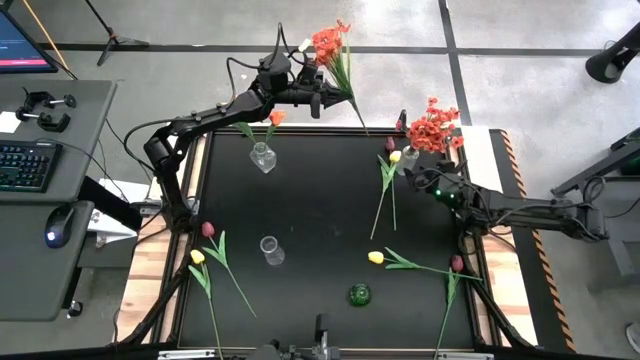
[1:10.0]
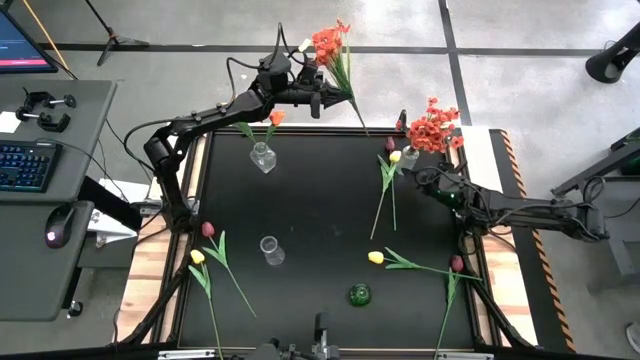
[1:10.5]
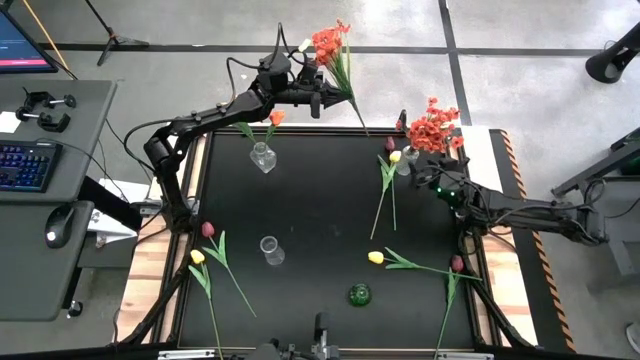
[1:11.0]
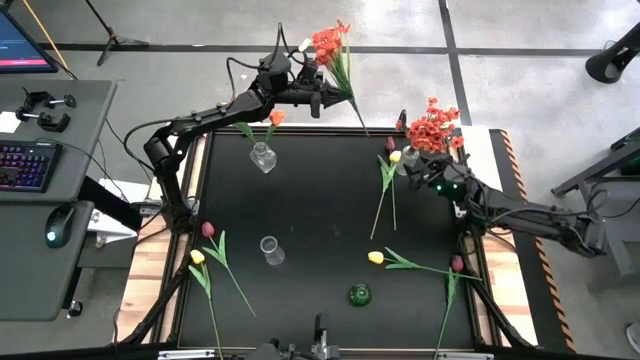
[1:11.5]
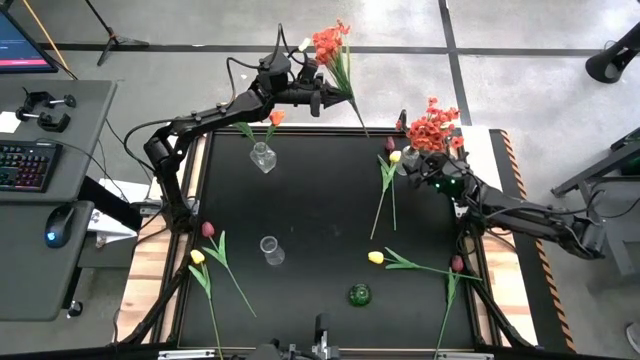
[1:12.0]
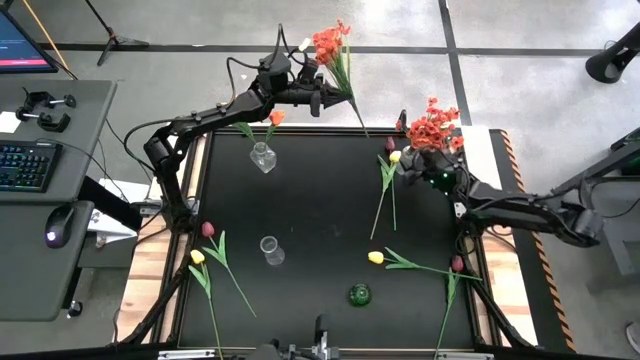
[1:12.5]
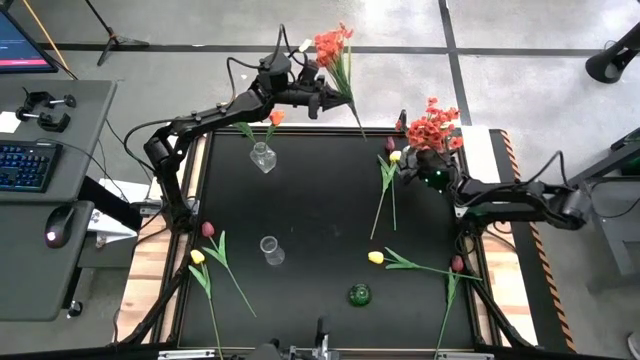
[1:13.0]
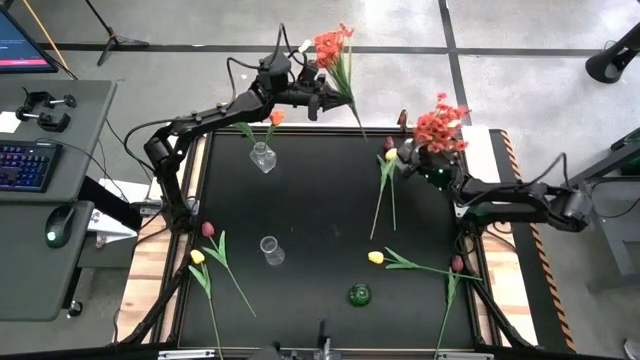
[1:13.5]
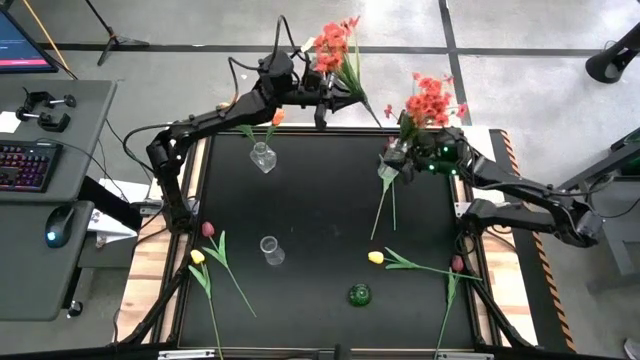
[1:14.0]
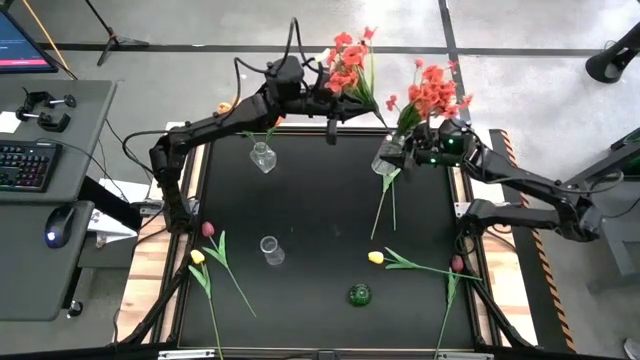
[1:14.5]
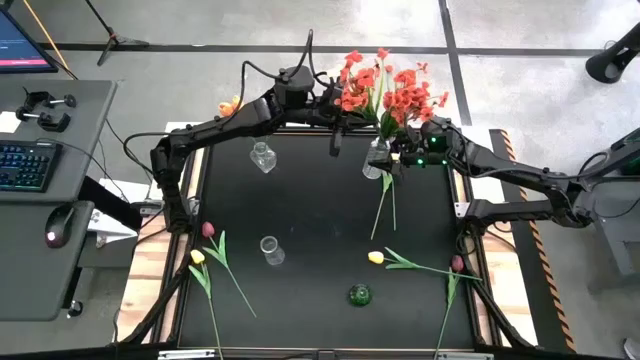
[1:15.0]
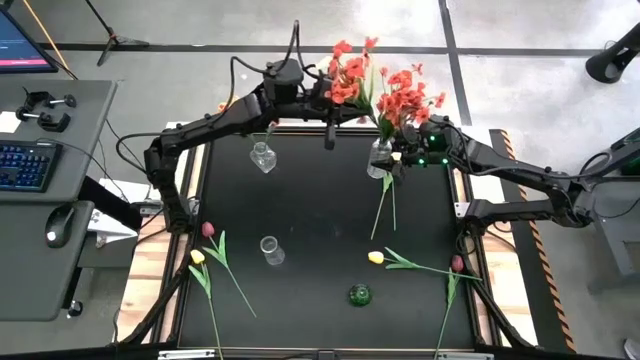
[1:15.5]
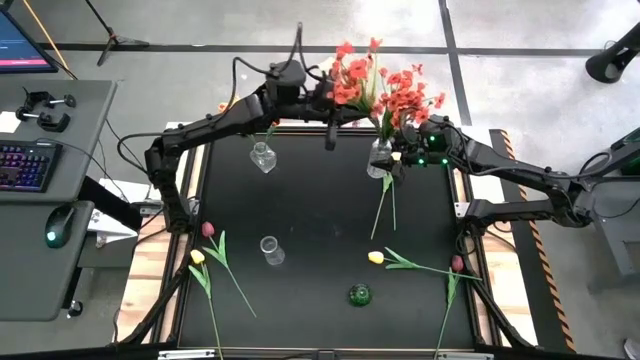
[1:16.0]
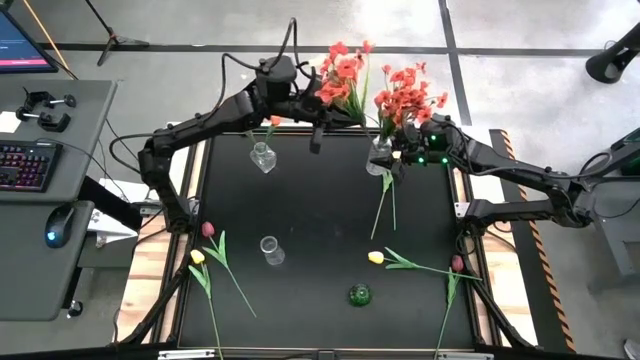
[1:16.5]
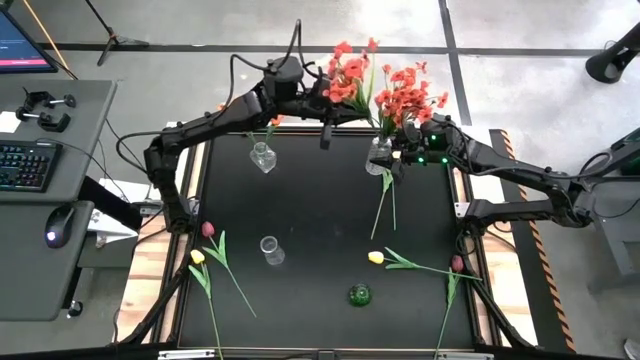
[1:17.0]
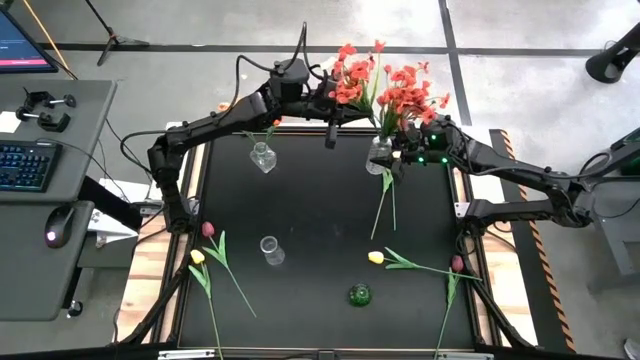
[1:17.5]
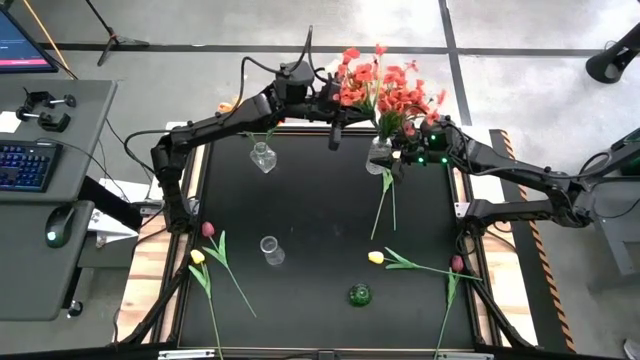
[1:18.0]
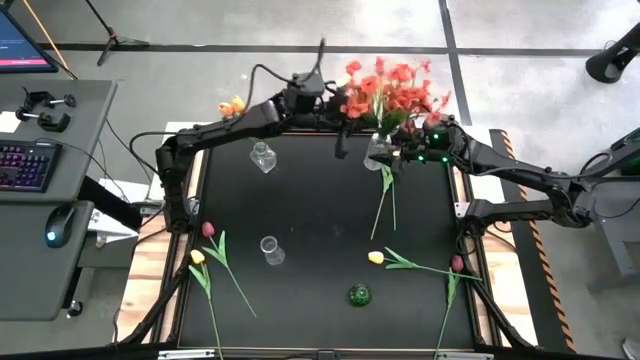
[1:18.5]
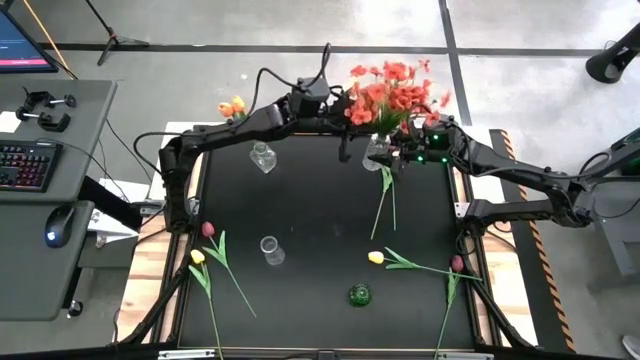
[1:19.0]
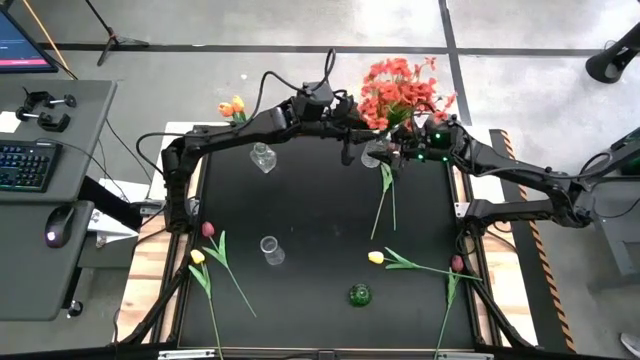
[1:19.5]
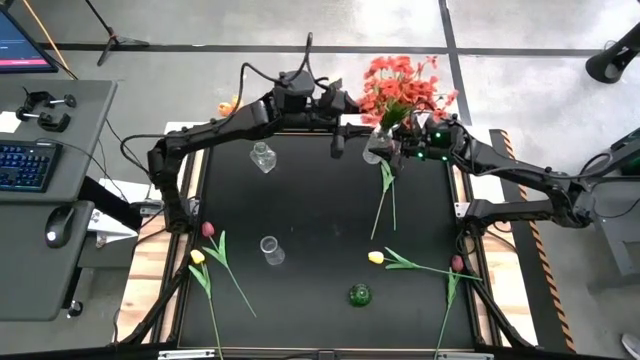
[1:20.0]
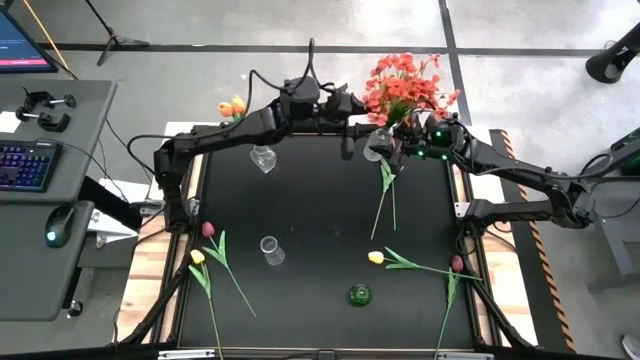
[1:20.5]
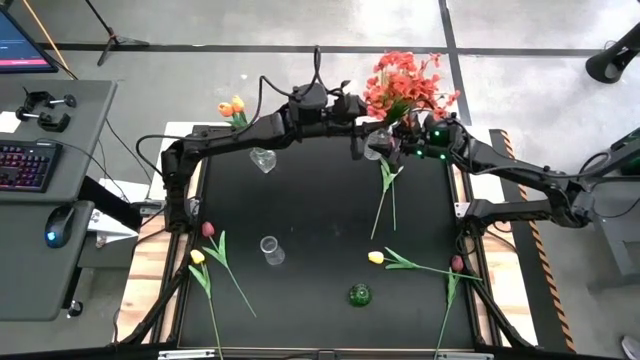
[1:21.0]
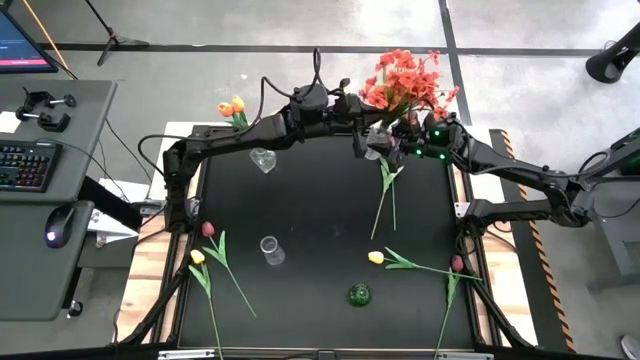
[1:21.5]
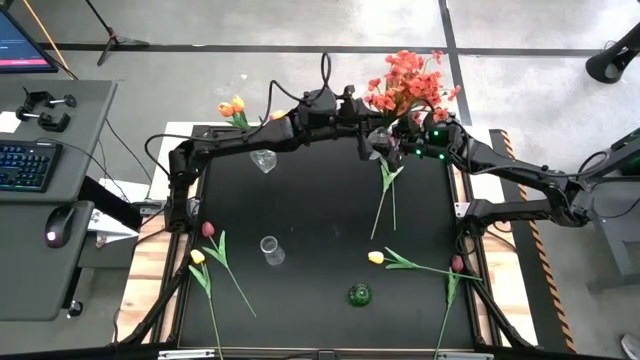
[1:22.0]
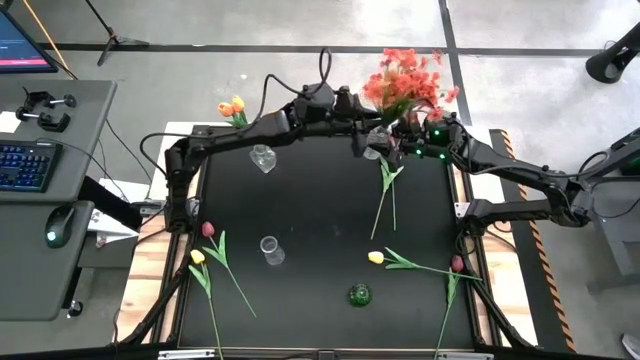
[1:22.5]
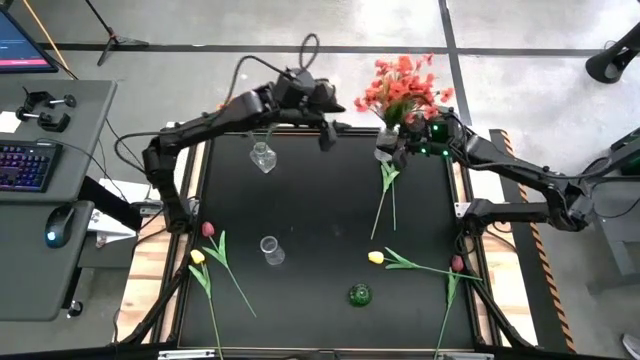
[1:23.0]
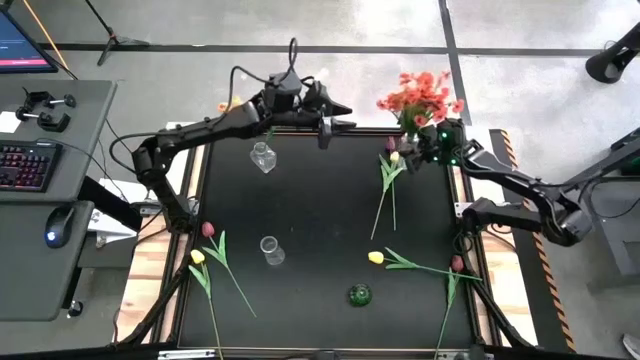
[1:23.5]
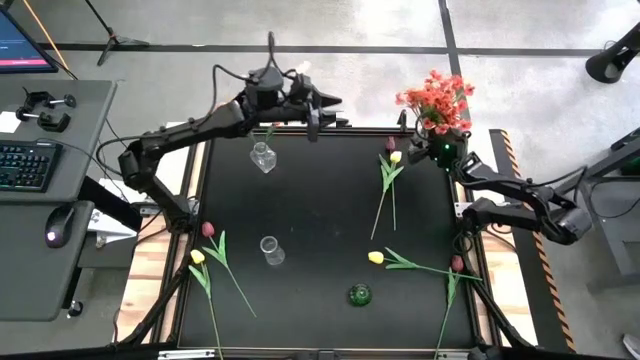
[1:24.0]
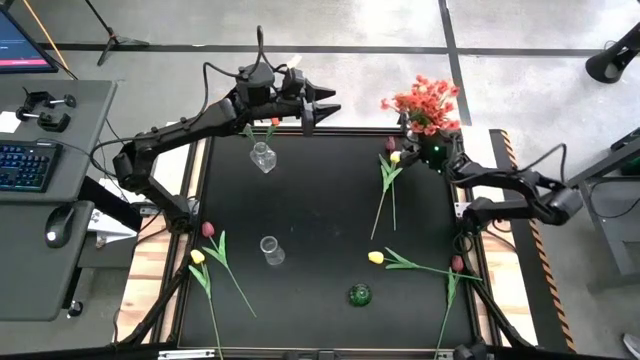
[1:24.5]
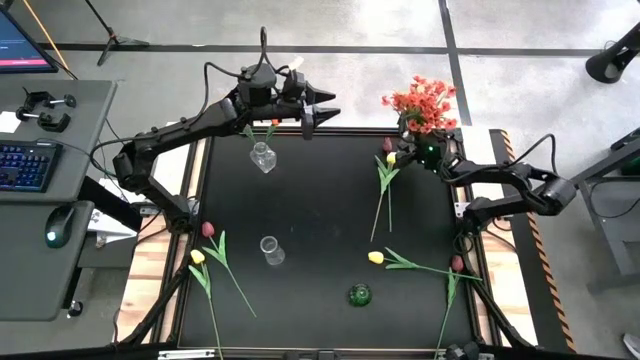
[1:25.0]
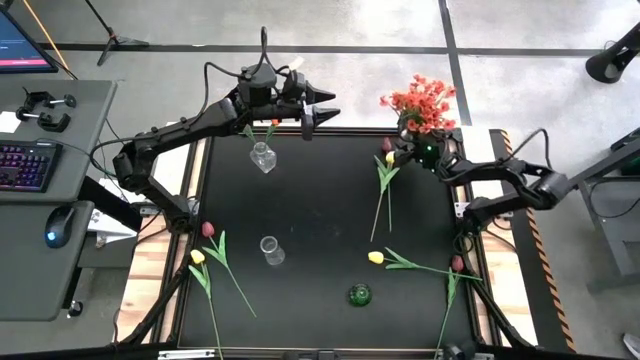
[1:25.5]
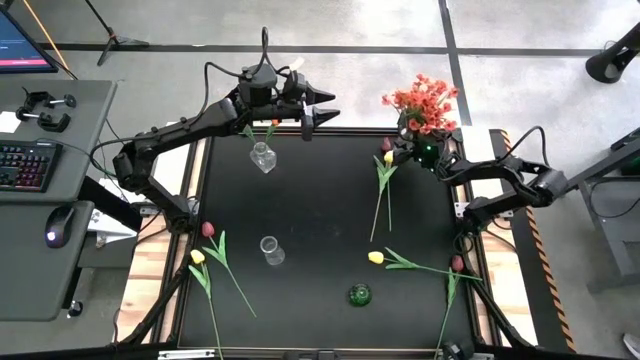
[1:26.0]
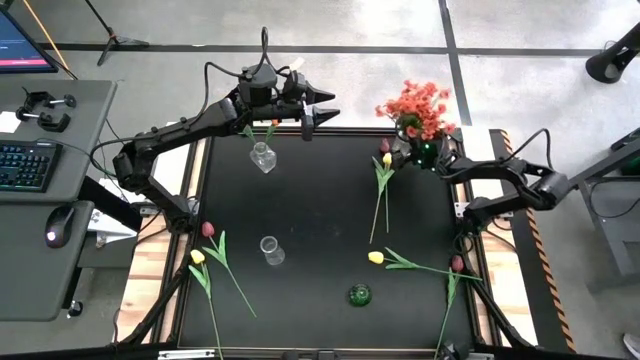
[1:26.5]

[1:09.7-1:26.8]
Task: Sort flowers into vase by color
Put the red flowers into the top right transparent vase

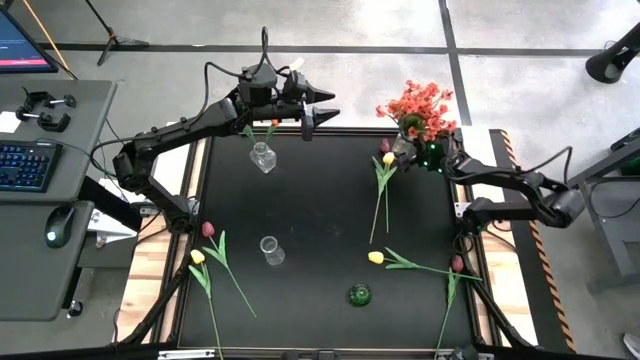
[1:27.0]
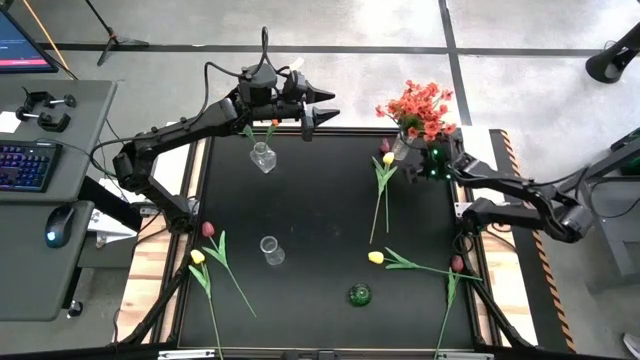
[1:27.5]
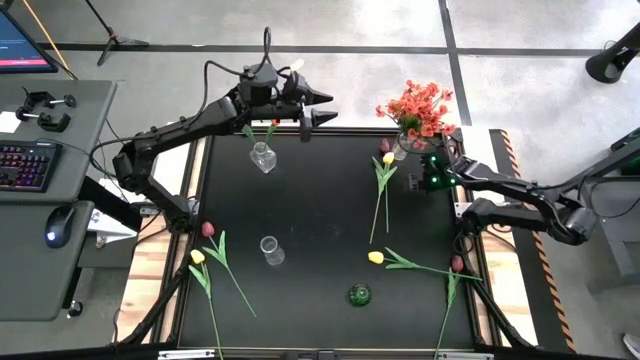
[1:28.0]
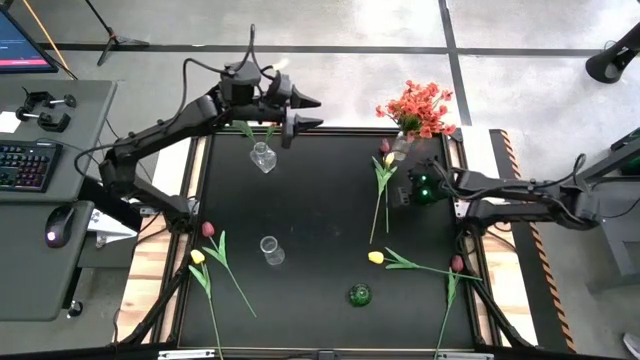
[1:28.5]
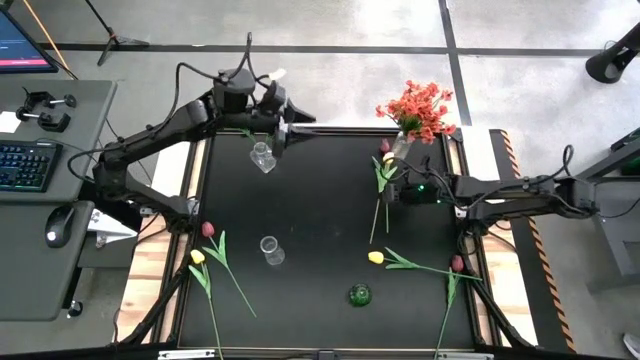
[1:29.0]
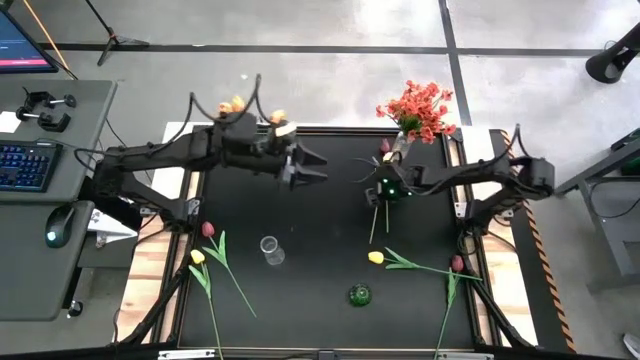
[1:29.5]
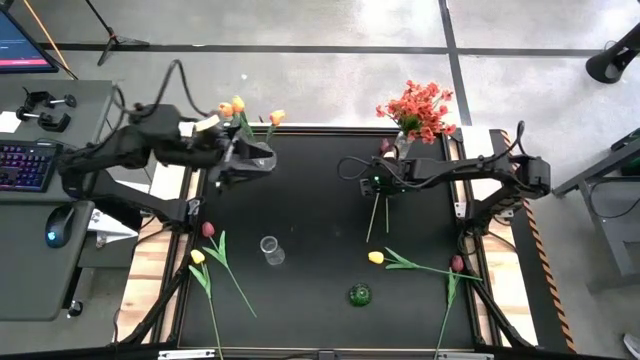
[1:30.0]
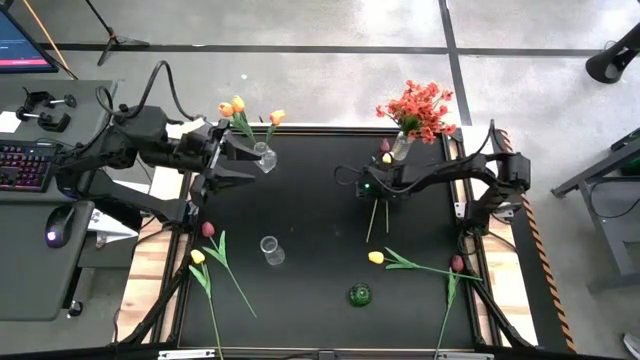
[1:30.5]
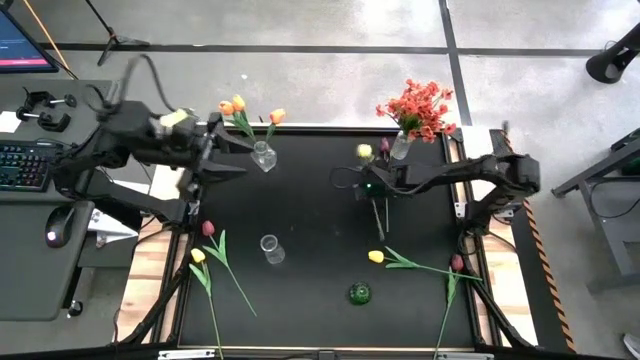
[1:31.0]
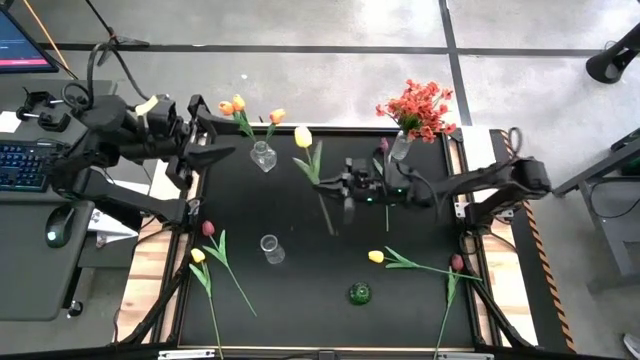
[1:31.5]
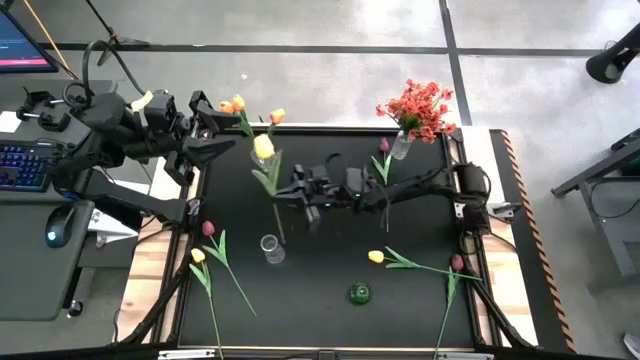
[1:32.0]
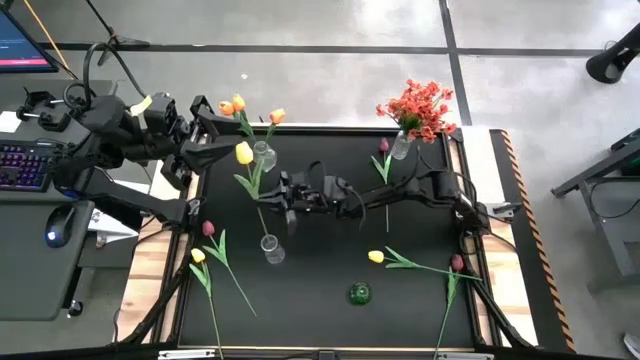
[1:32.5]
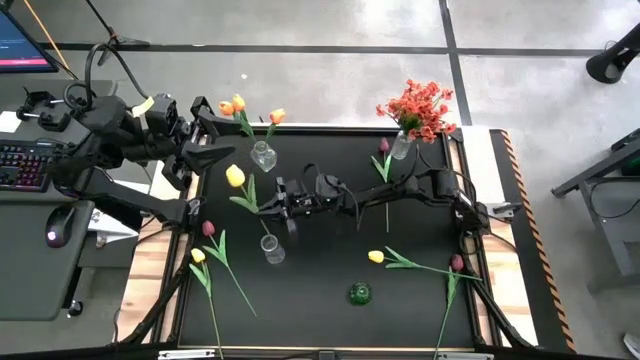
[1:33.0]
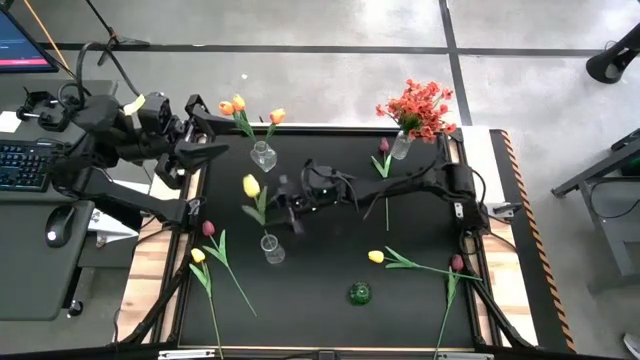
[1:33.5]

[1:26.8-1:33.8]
Put the top yellow flower into the bottom left transparent vase
